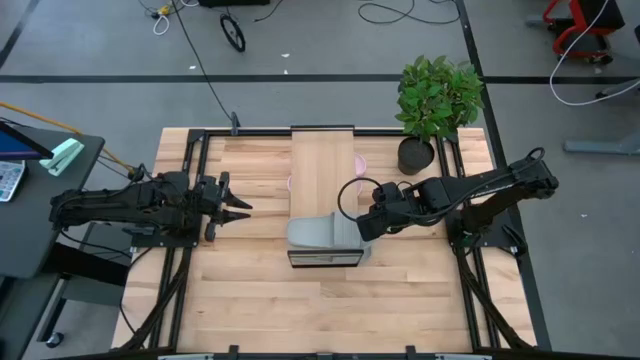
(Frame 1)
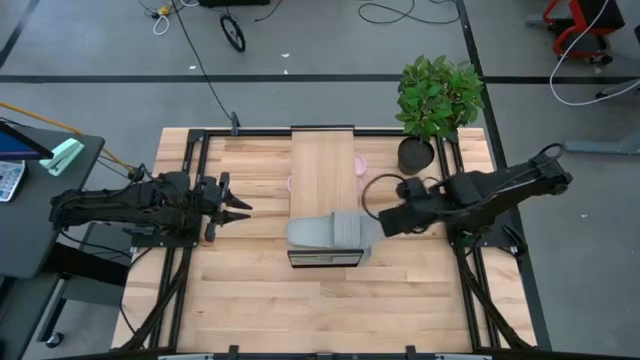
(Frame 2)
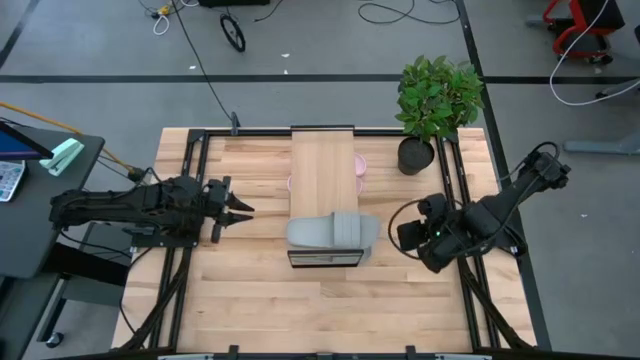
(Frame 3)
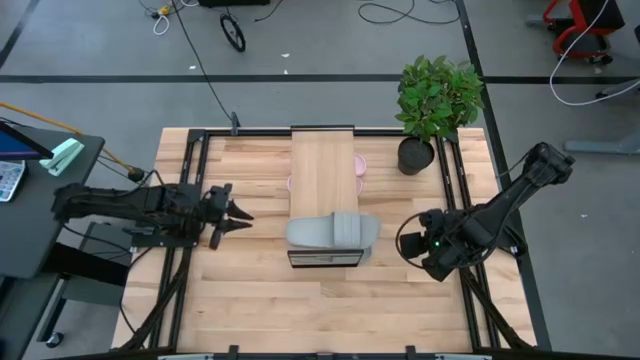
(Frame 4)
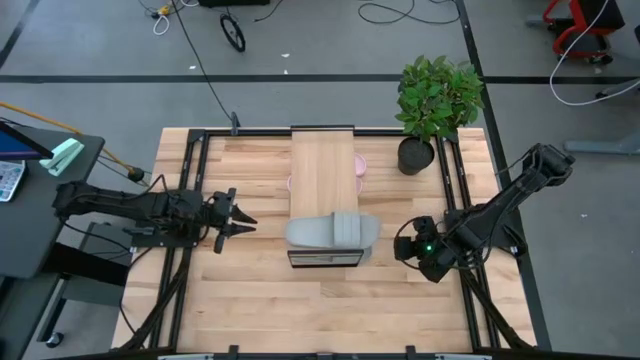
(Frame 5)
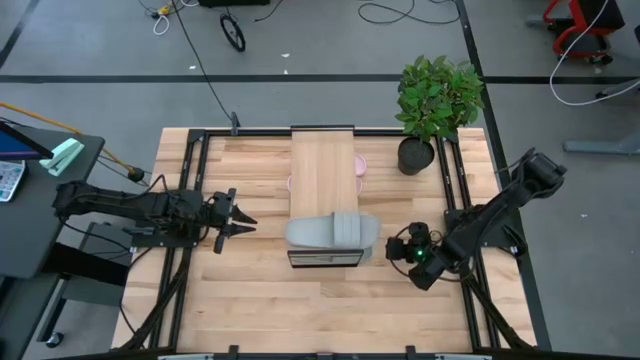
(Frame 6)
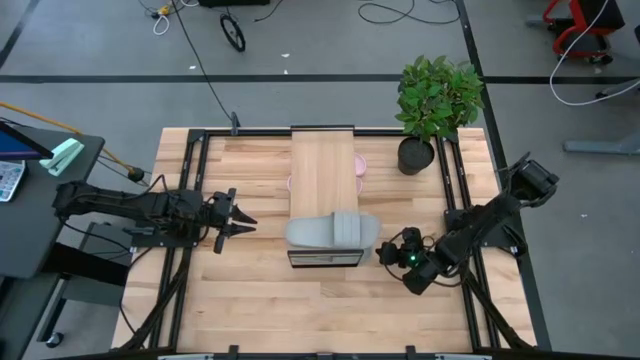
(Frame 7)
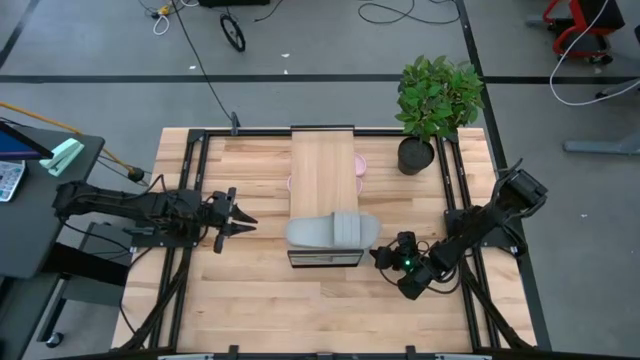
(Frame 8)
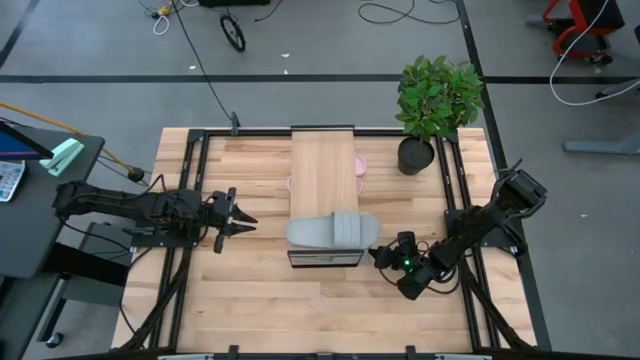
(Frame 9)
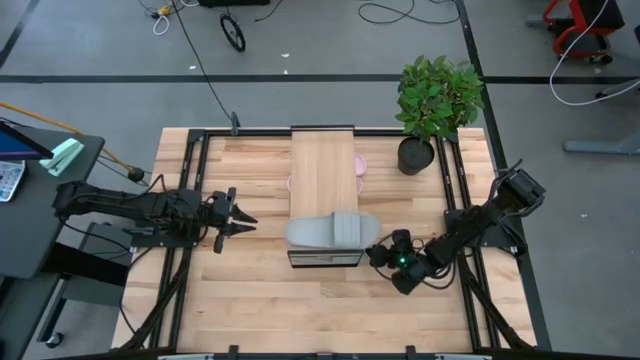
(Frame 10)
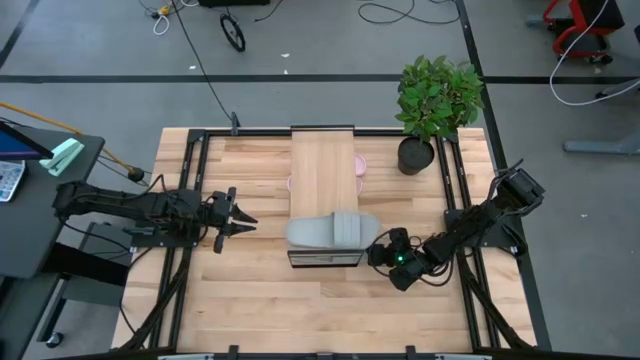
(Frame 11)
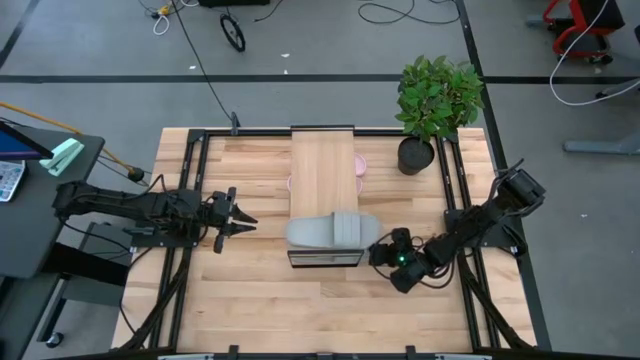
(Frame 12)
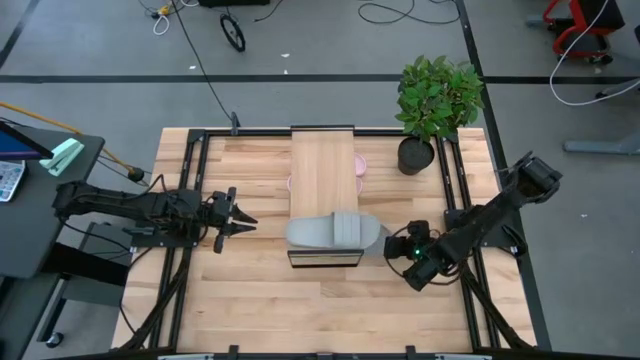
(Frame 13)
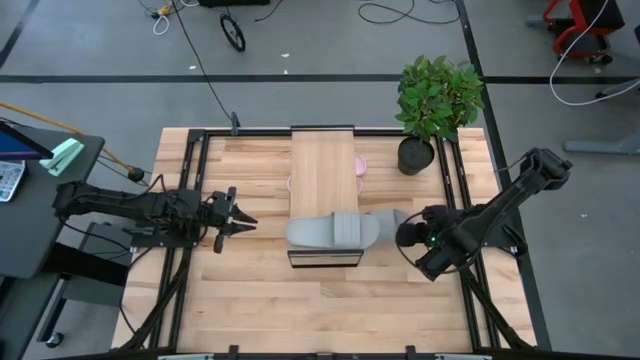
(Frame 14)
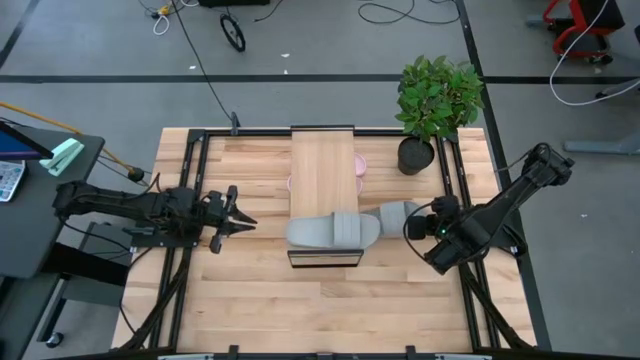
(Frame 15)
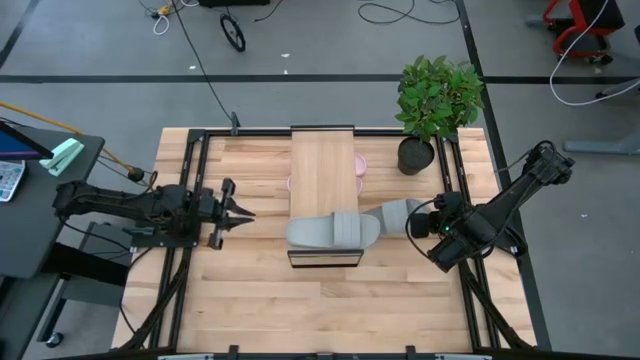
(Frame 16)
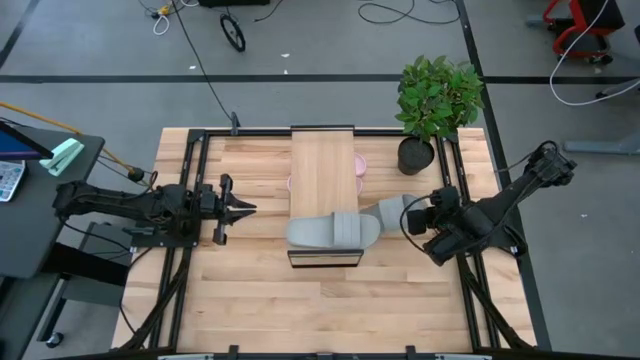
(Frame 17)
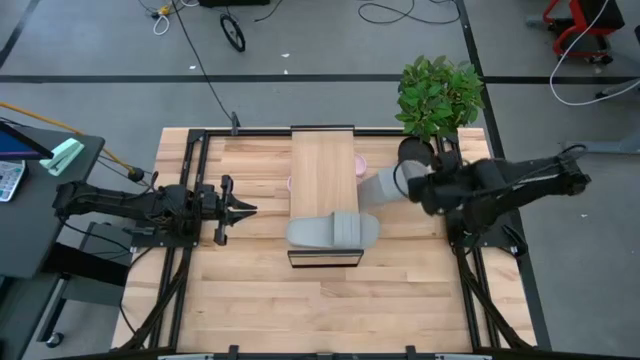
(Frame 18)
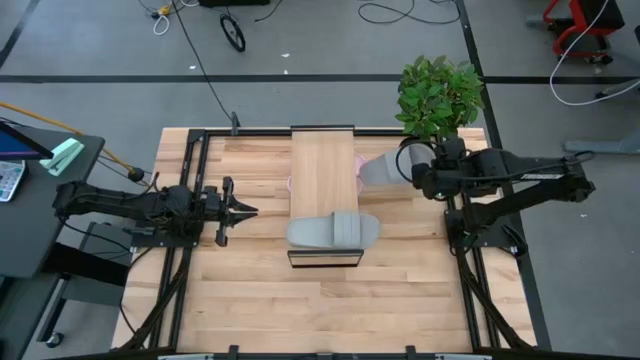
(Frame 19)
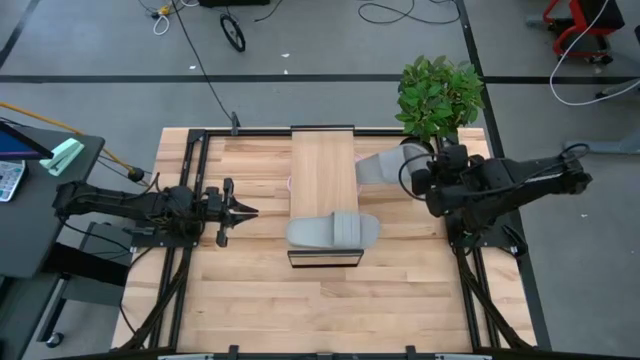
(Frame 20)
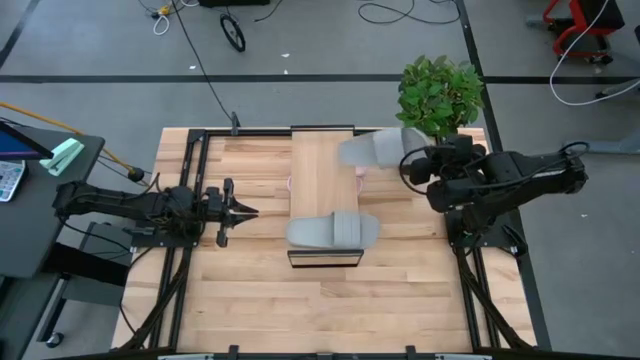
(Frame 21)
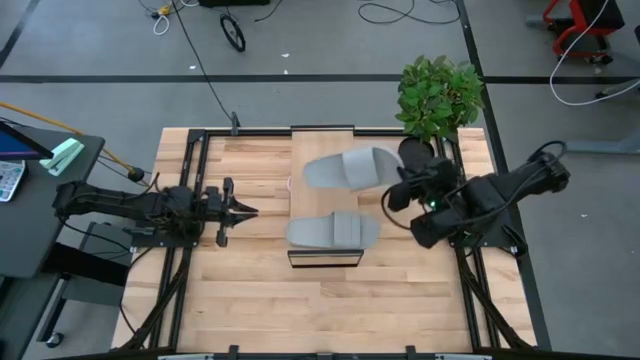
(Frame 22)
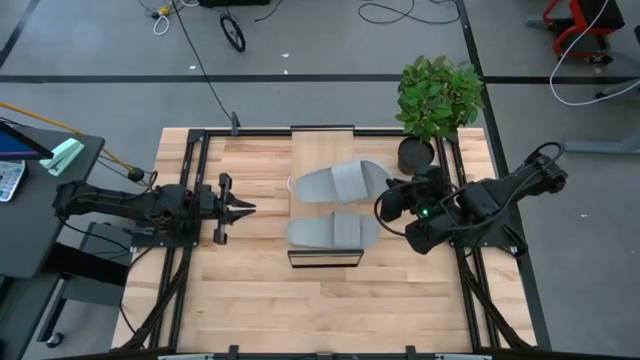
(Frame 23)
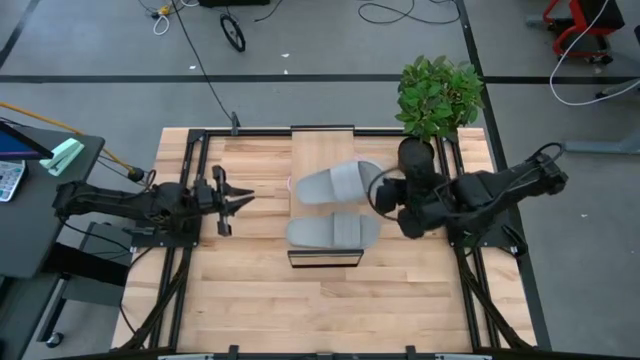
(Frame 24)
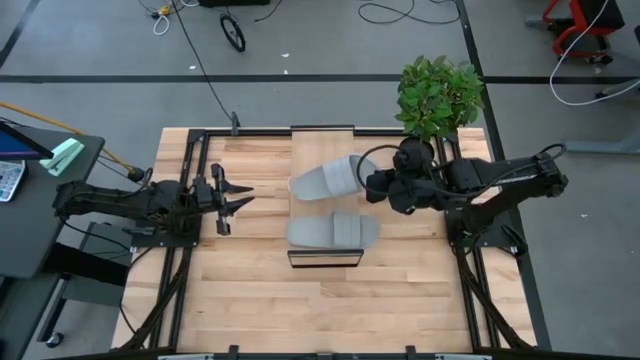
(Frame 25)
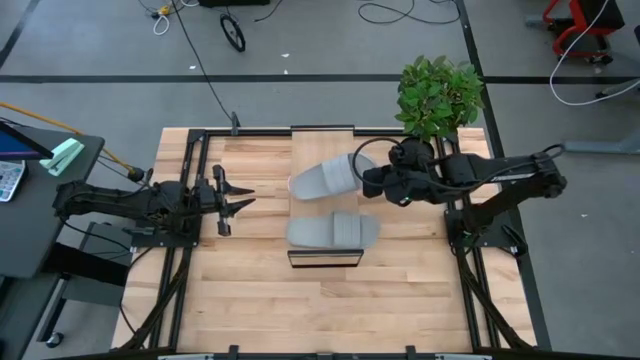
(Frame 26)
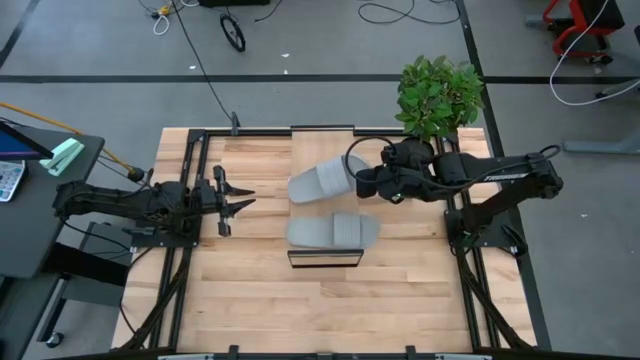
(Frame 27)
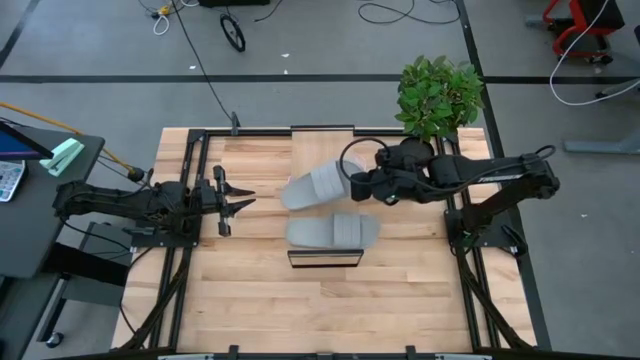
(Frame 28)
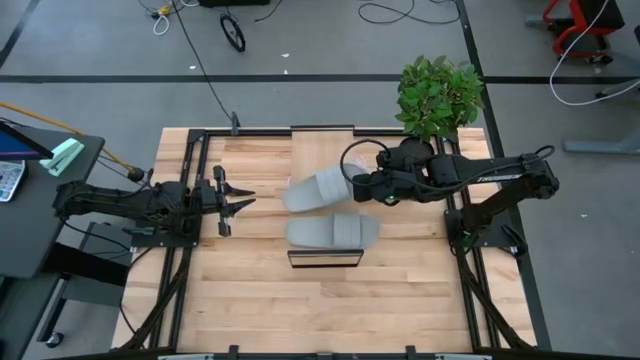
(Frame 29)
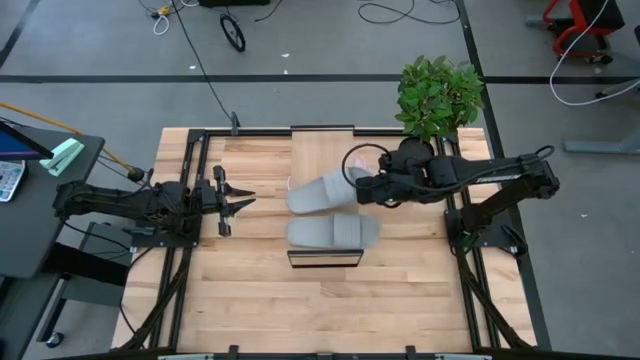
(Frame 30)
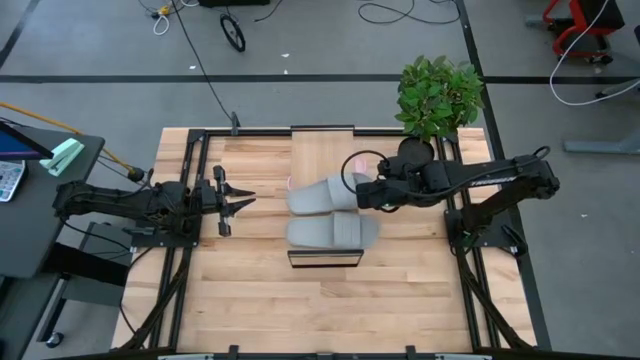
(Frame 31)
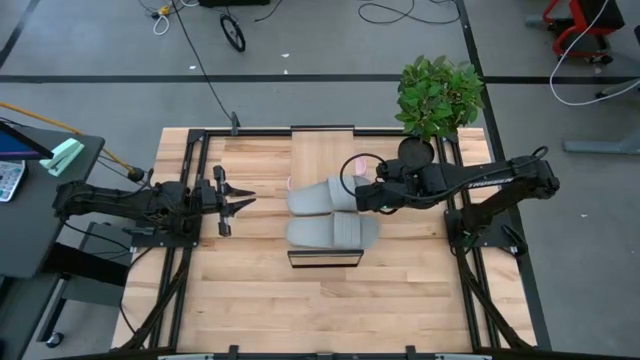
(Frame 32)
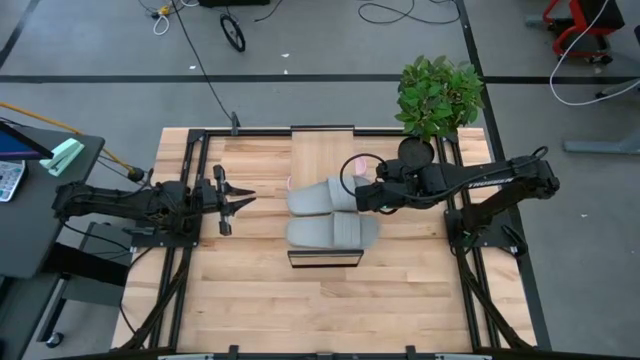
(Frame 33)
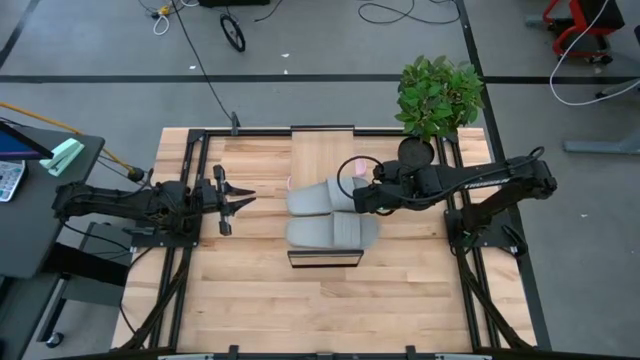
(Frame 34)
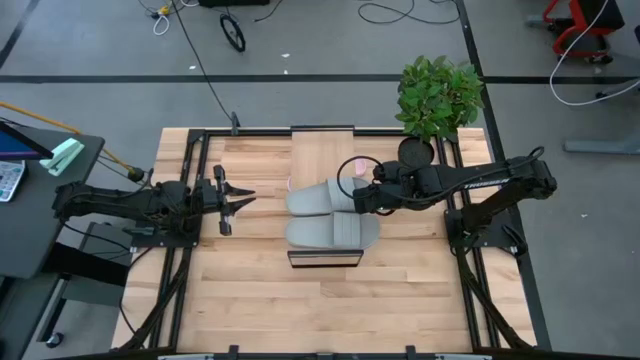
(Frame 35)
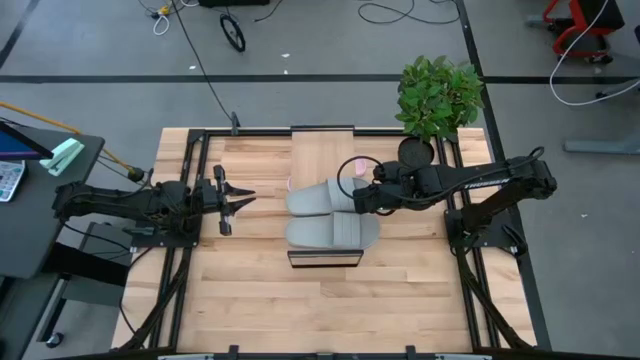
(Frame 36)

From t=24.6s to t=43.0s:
Task: Pick and place slides into the shelf
Put the gray slipper on the shelf

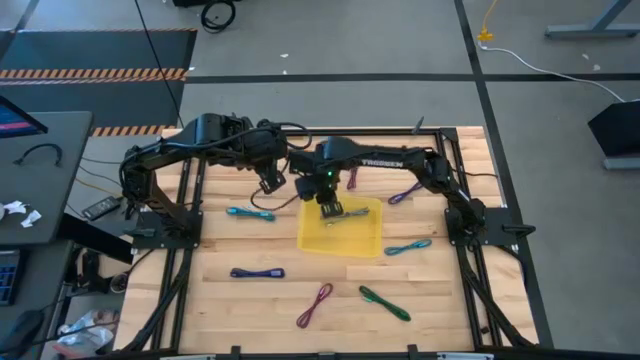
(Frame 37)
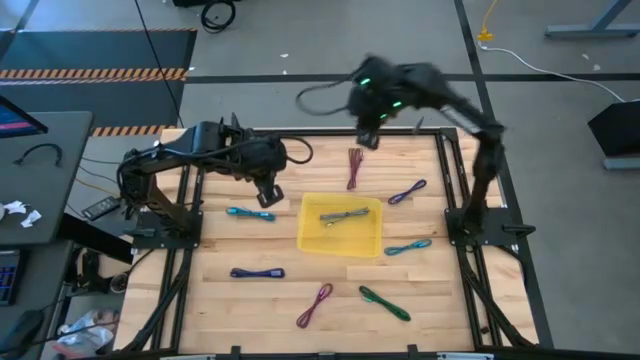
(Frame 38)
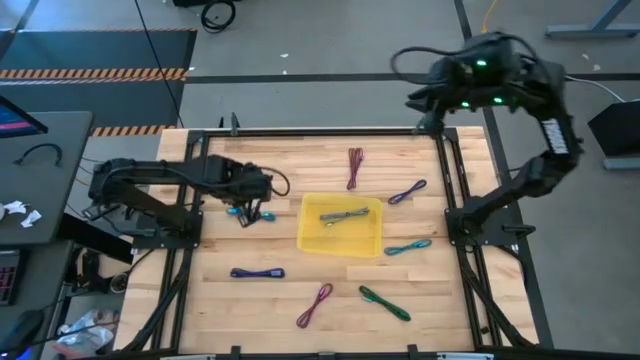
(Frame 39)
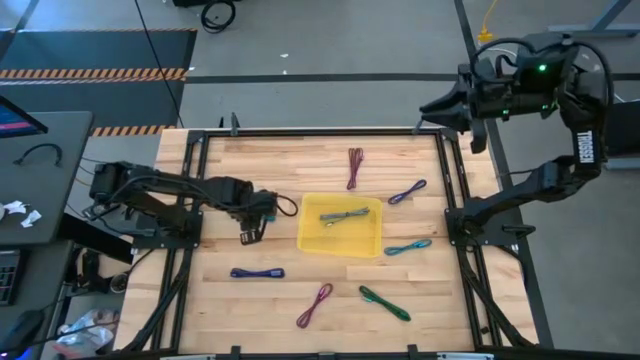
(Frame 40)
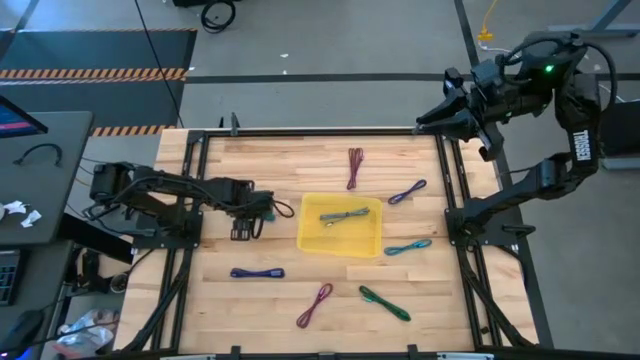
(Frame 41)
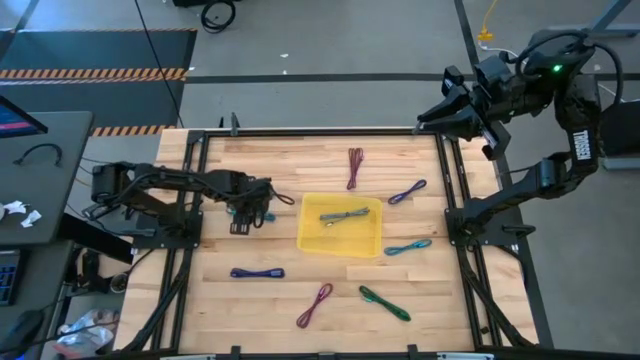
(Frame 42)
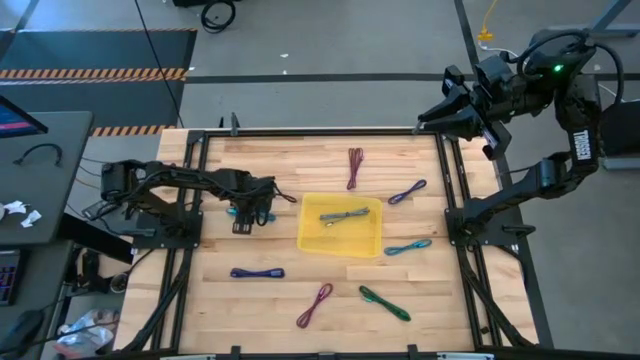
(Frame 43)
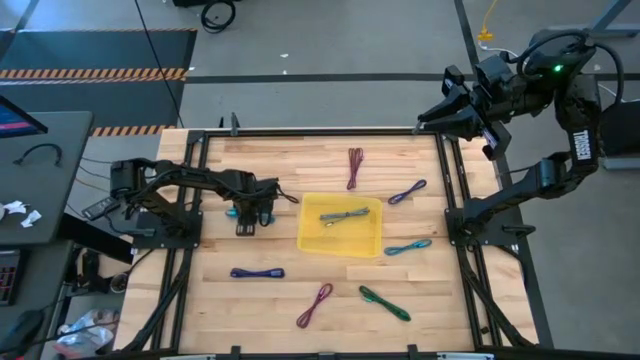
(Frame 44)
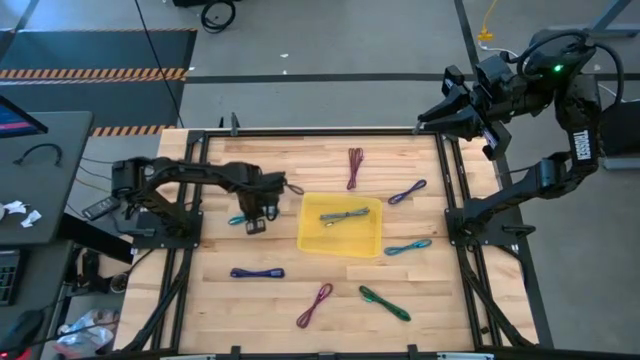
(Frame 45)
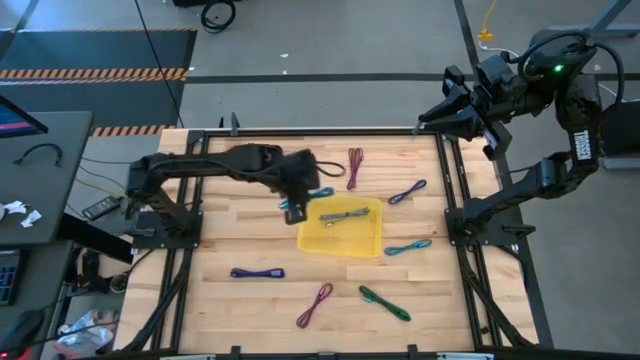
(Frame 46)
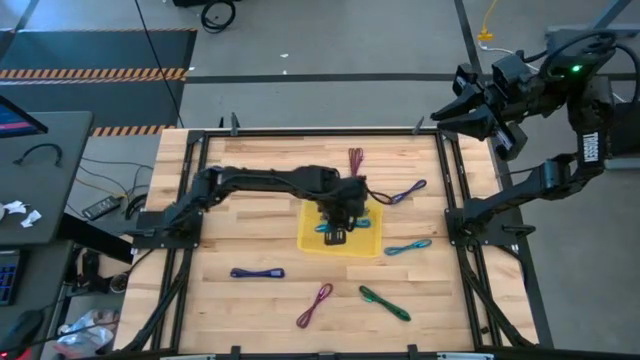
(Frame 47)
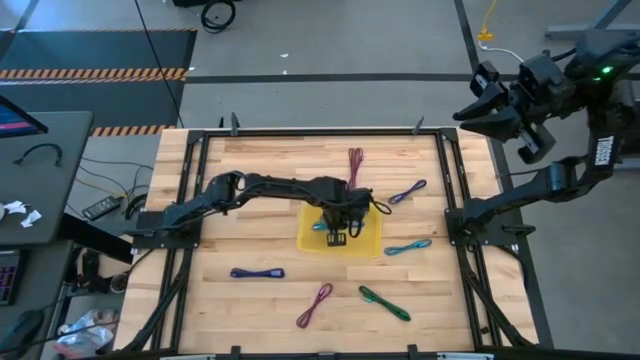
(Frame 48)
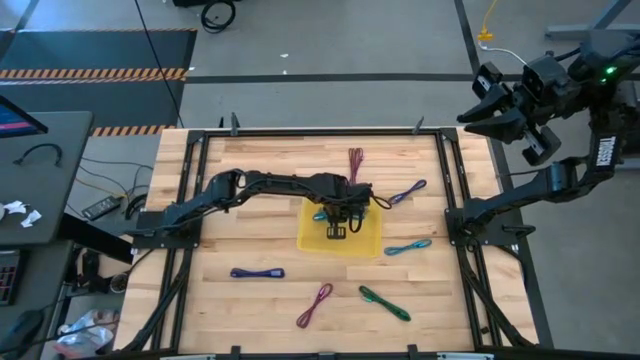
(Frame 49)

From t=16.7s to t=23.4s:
Task: Pick and place USB-C Cables
Put the top blue charger cable into the yellow bin
